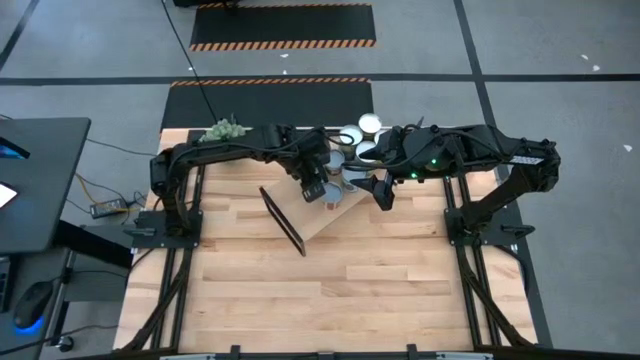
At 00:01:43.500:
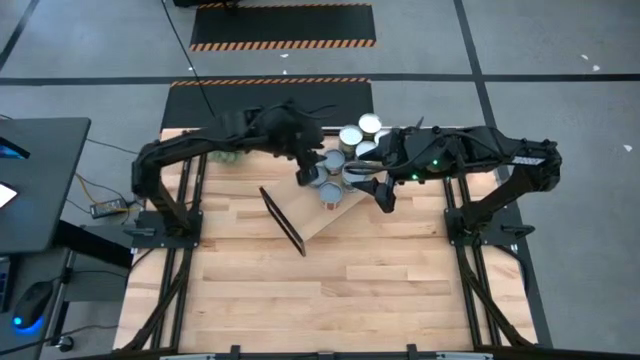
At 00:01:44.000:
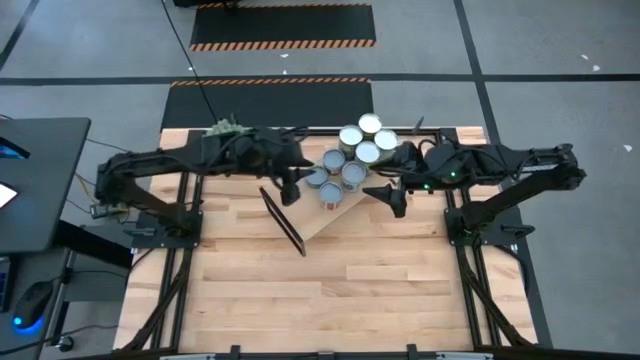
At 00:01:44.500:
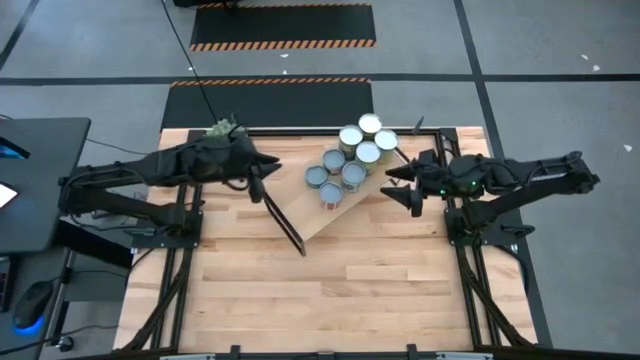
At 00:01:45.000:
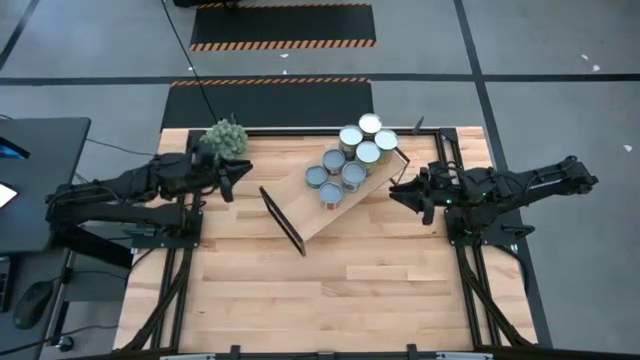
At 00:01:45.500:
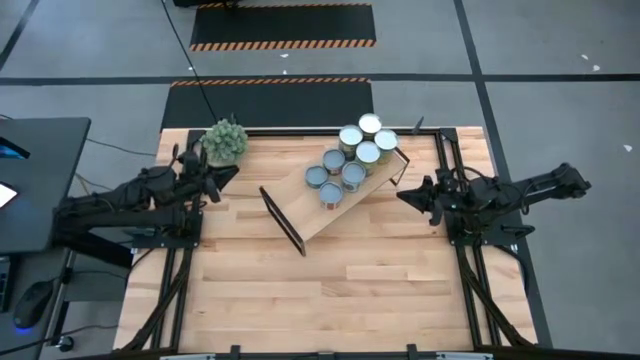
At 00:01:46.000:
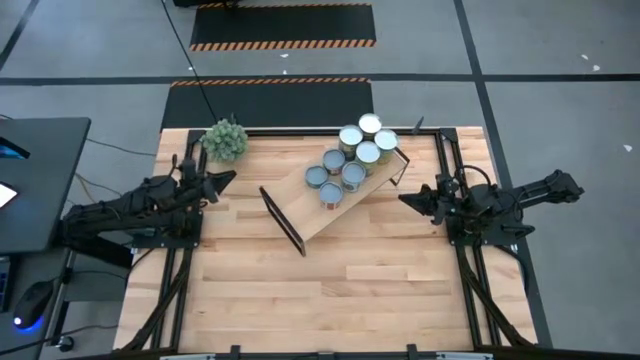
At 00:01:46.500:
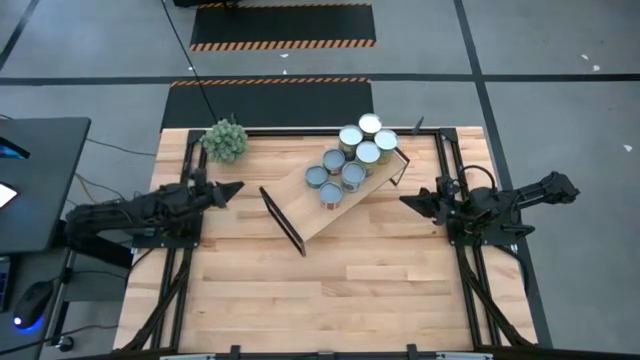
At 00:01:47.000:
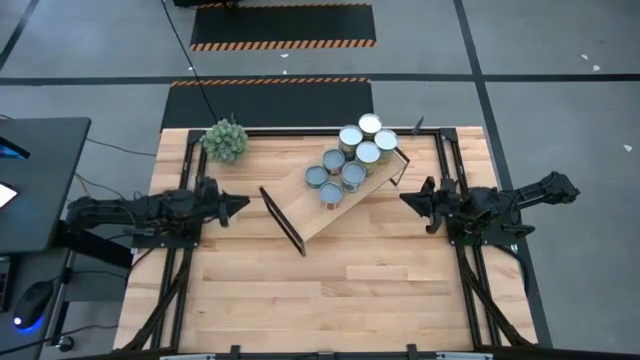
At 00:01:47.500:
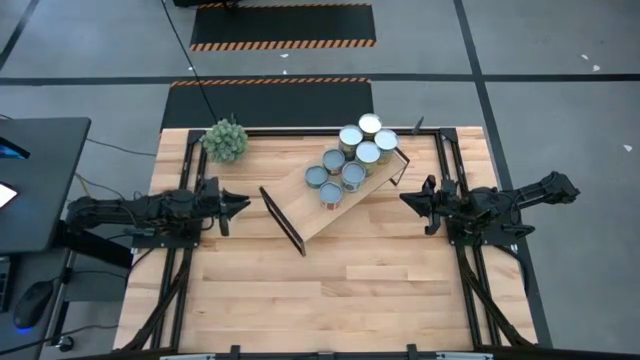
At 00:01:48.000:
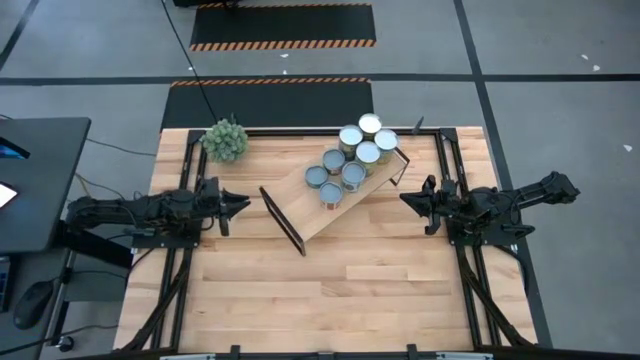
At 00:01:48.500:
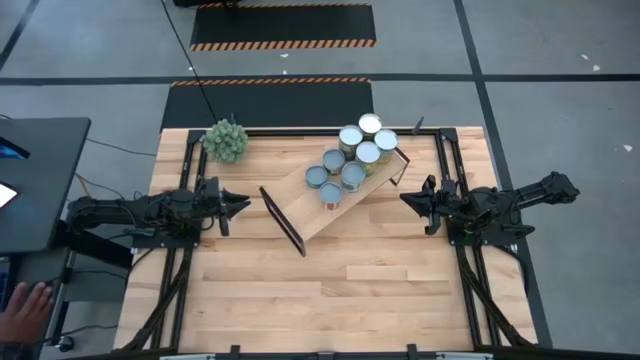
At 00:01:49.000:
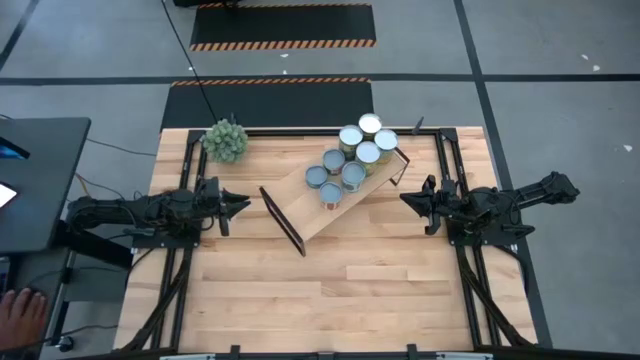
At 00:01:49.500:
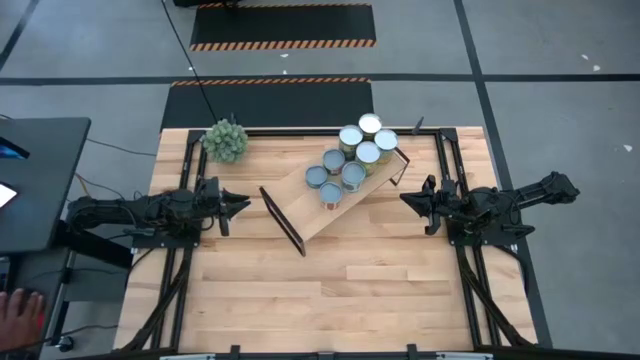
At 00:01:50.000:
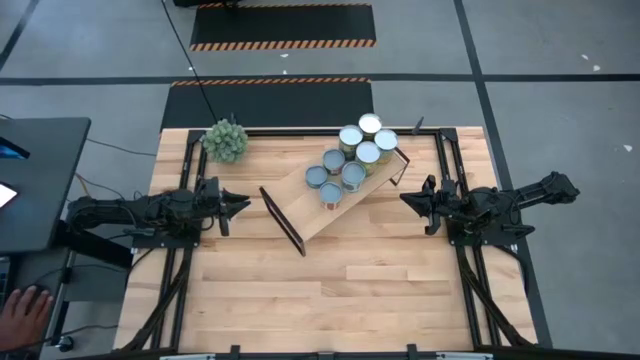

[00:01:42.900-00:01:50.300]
Task: Pick and place cans onto a shelf
Return to Home Position

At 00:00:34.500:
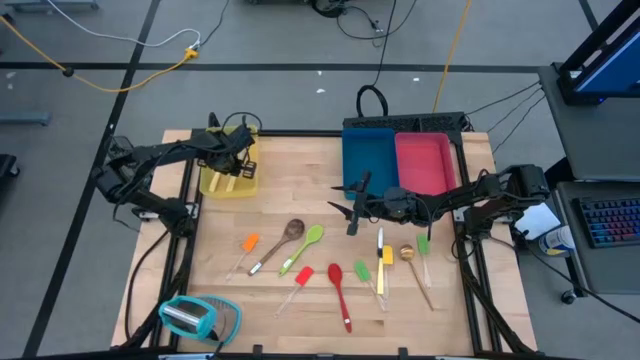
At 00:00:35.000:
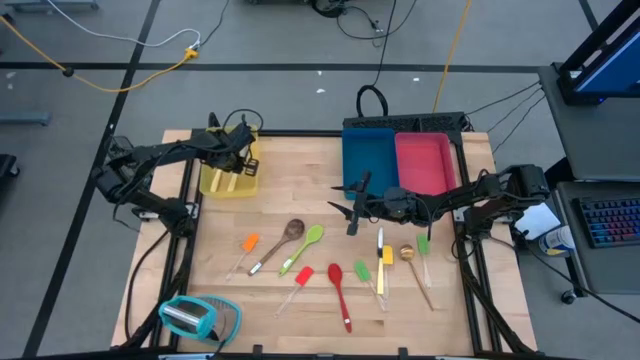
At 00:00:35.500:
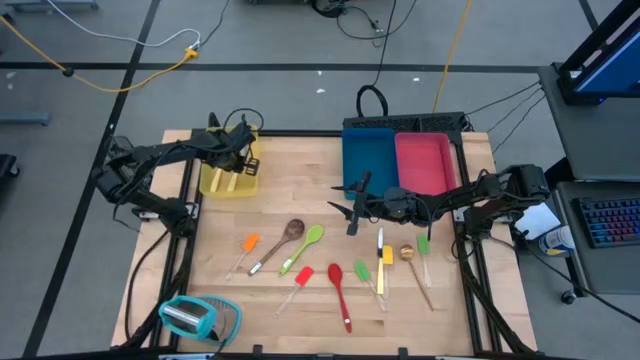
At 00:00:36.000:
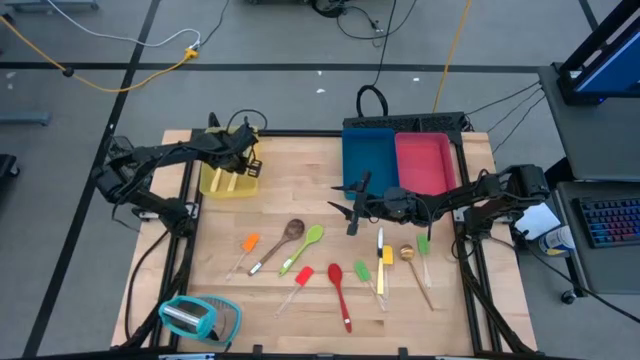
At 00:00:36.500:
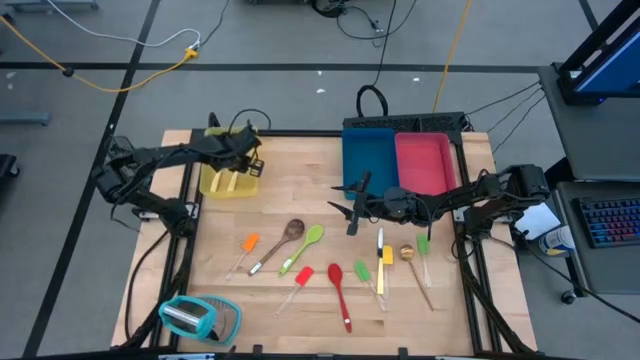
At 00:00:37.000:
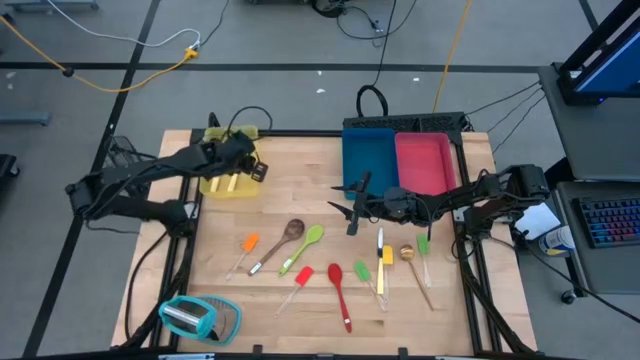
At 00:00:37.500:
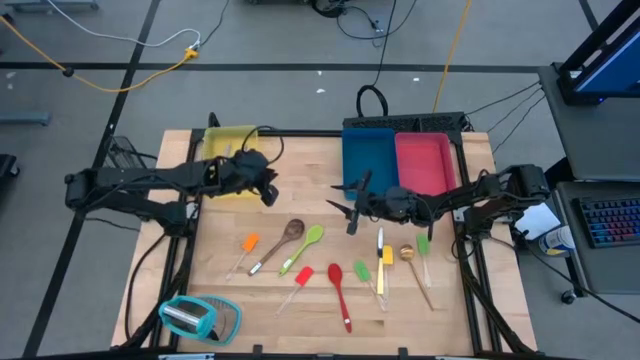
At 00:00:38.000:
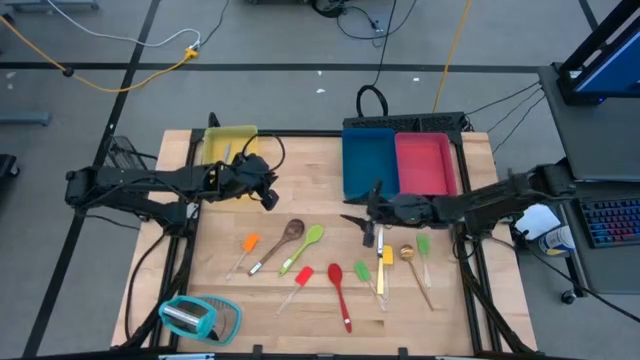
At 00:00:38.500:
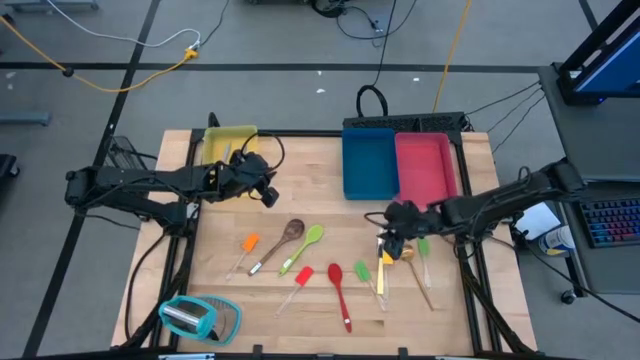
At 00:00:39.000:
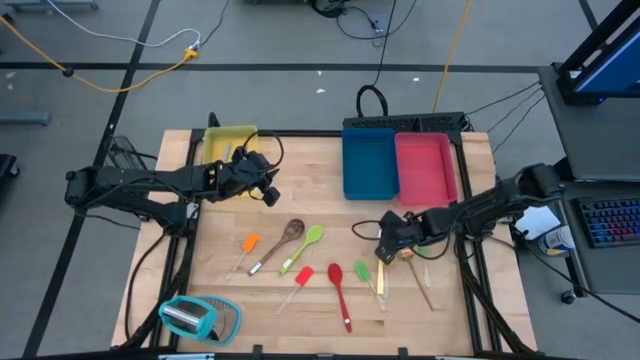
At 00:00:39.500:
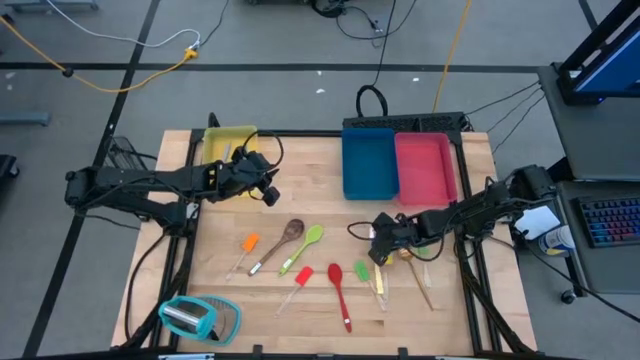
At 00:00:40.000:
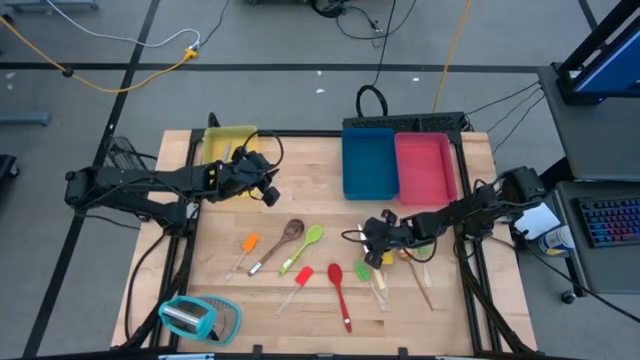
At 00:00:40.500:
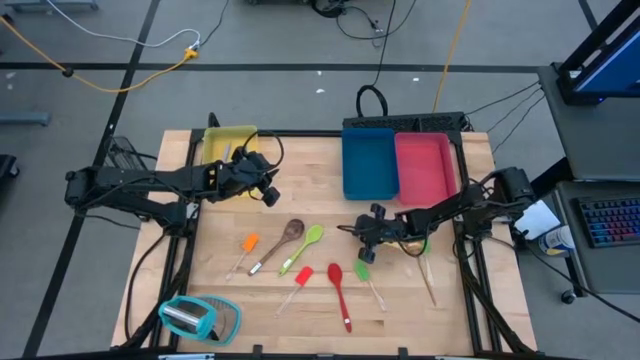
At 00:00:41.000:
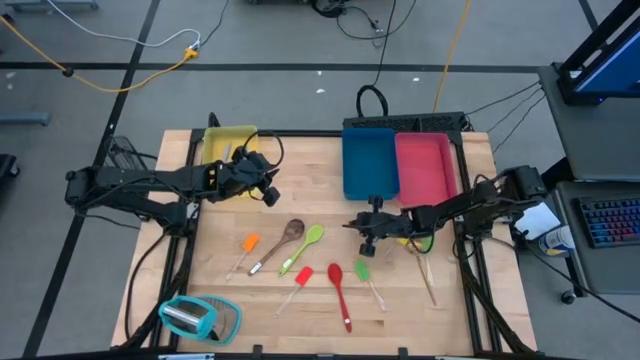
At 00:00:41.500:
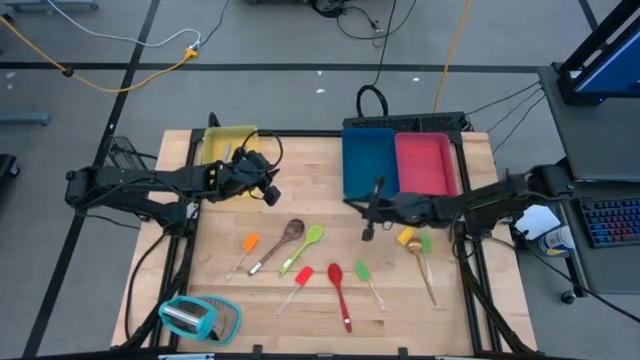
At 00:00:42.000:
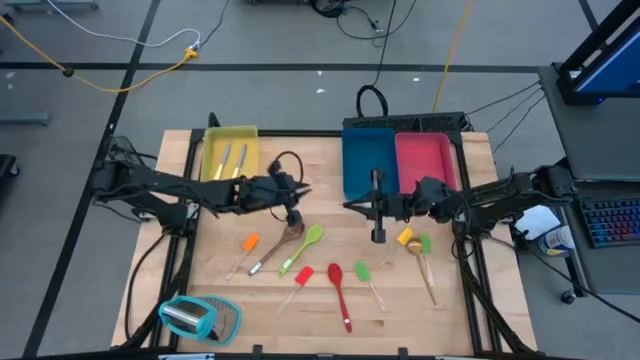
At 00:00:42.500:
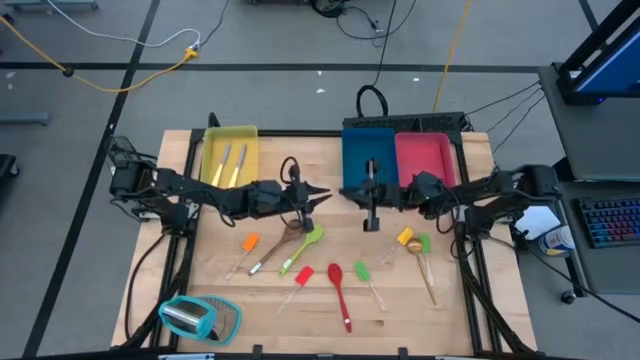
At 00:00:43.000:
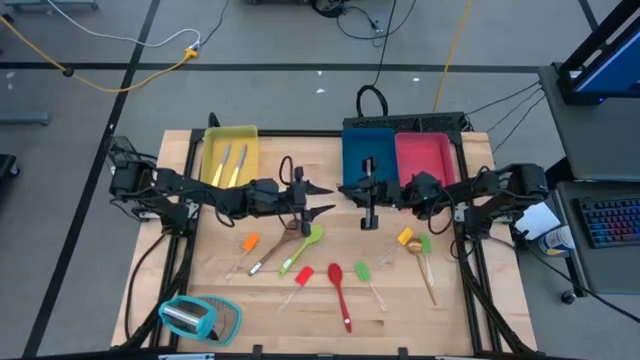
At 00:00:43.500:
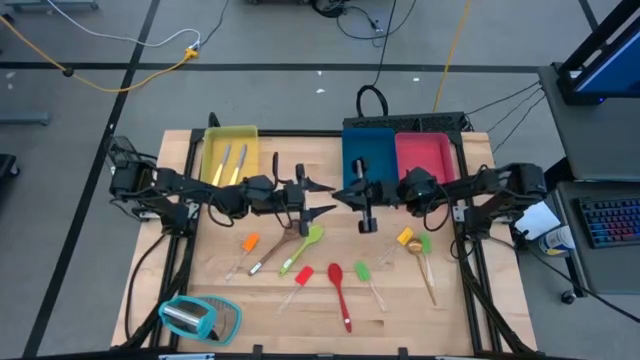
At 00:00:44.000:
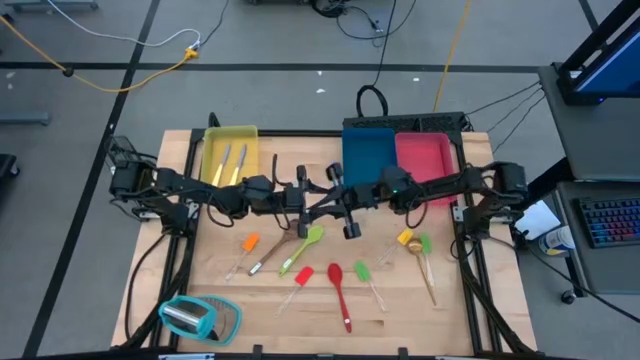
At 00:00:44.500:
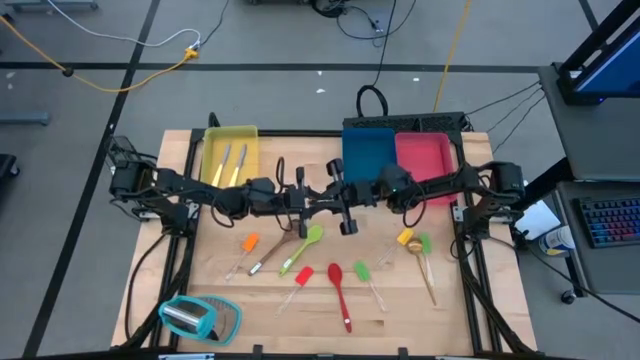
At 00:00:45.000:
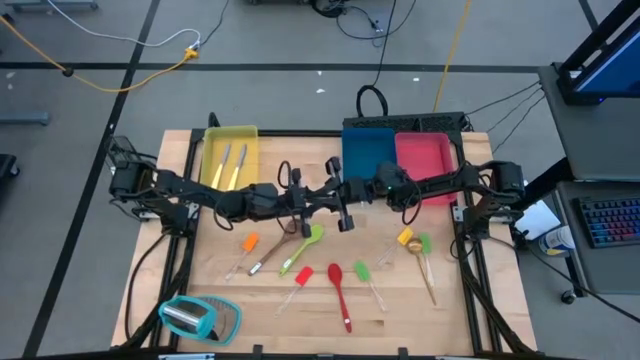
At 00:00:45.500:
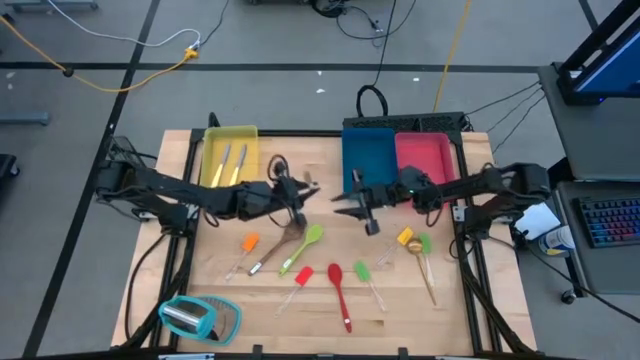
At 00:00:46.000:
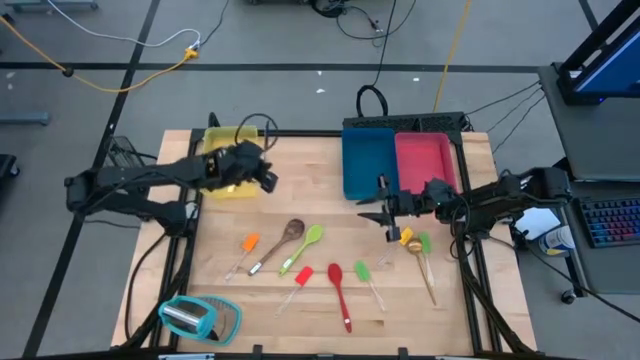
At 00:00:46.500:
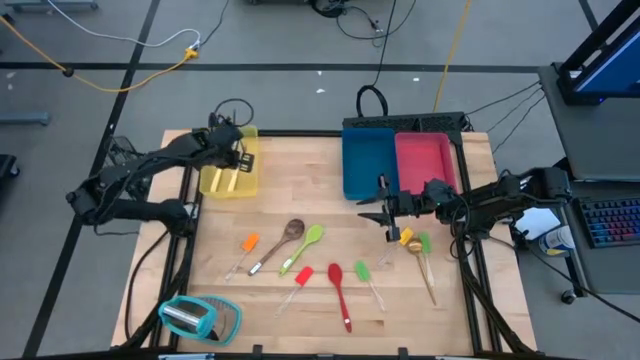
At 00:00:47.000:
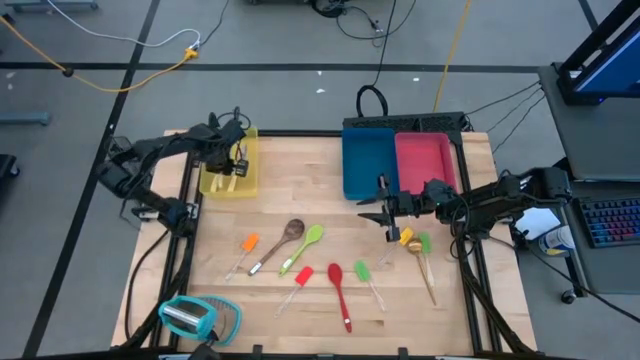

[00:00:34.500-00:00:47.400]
Task: Pick & Place Kitchen Items
Put the yellow knife into the yellow bin
